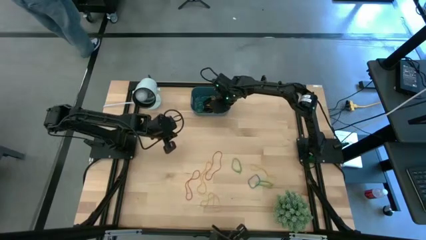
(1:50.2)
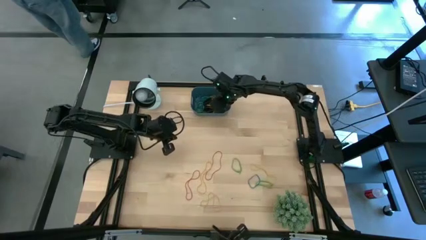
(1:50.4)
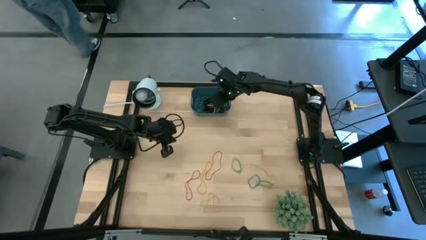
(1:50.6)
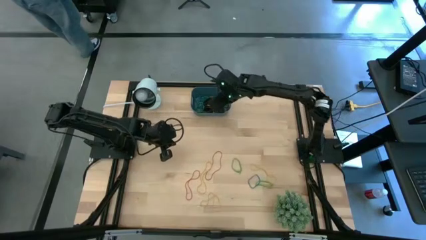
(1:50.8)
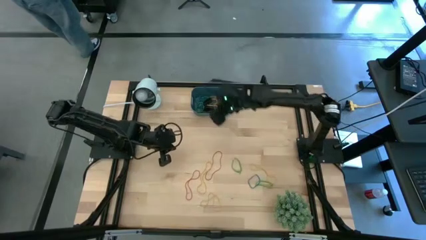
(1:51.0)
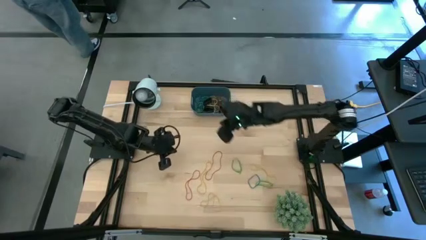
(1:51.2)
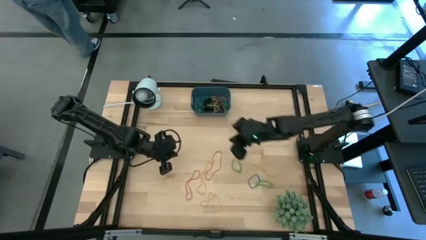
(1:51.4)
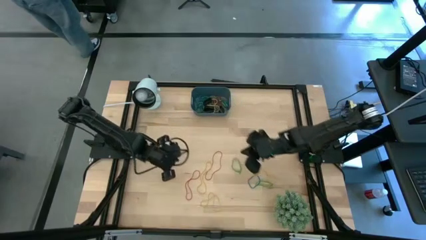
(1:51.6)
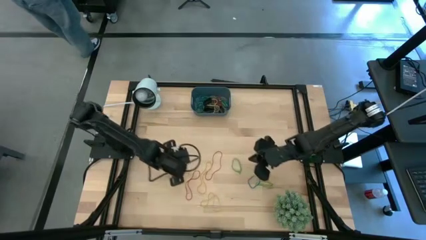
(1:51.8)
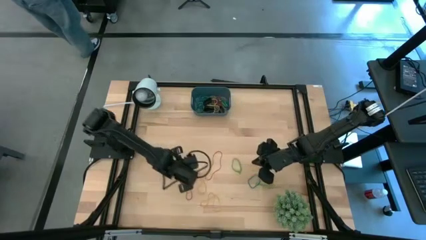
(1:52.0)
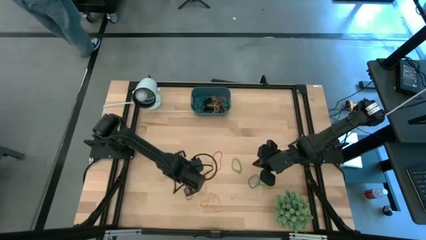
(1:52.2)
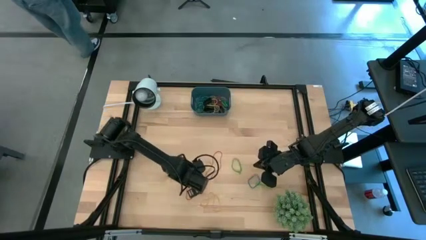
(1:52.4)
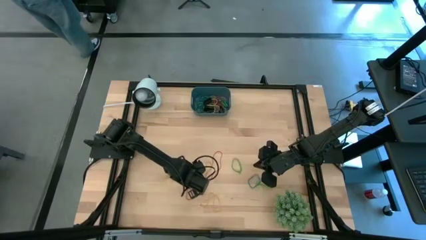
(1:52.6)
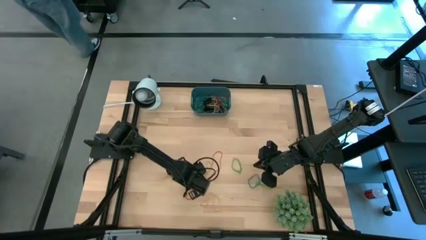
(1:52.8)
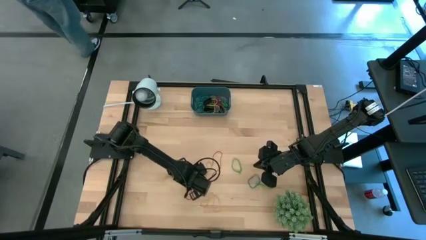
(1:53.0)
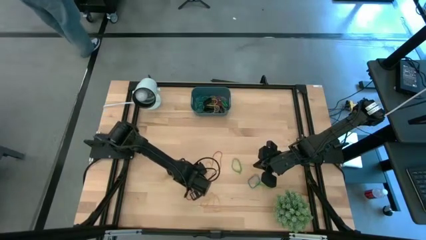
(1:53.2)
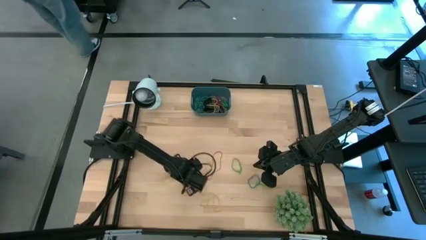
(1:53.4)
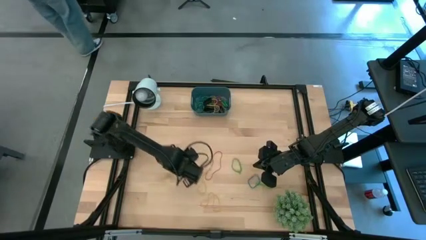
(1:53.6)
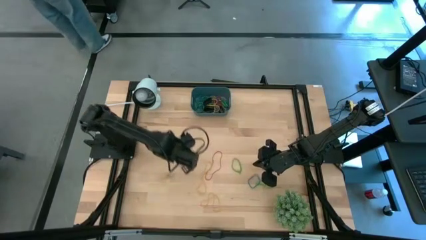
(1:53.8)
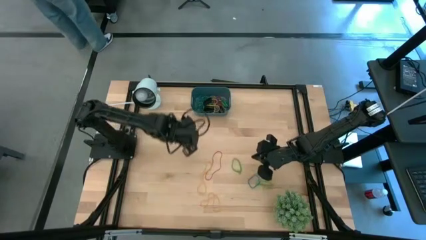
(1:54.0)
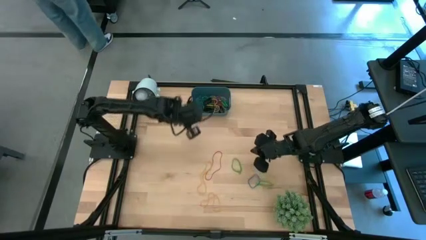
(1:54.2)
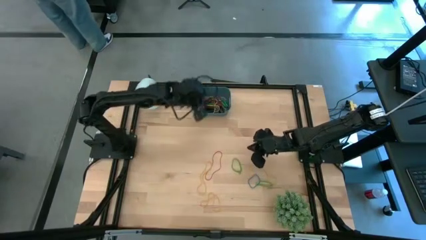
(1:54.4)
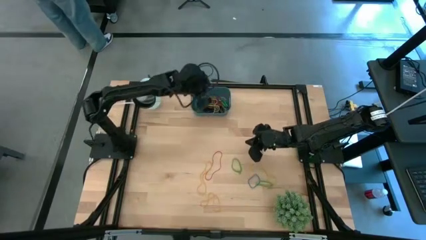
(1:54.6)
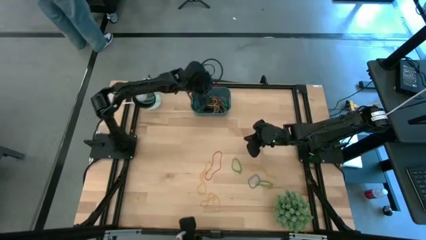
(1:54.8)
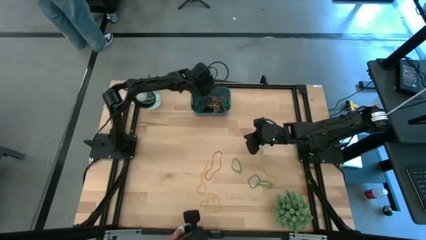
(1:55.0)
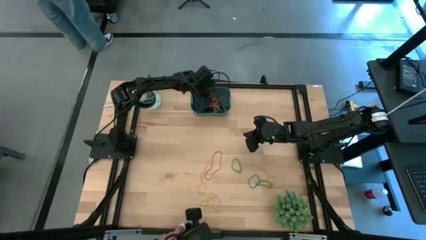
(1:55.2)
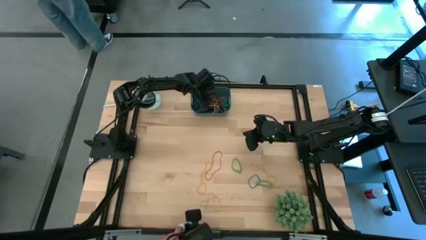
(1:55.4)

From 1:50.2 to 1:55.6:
Task: Pick and place rubber bands into bin
Put the red rubber band into the blue bin

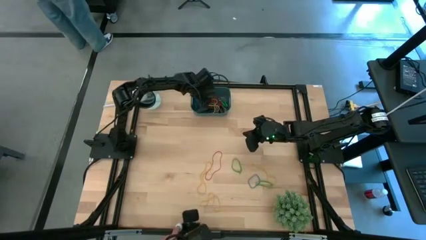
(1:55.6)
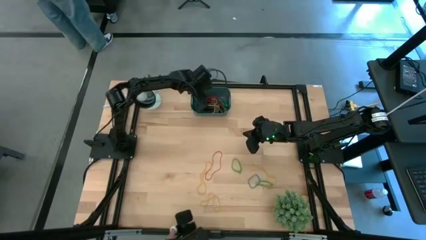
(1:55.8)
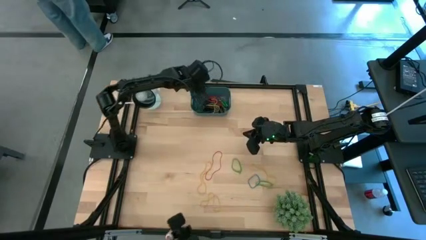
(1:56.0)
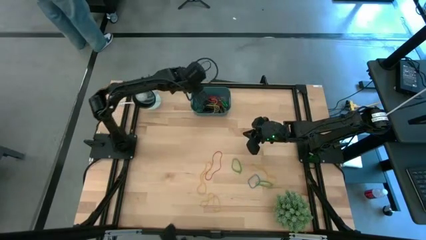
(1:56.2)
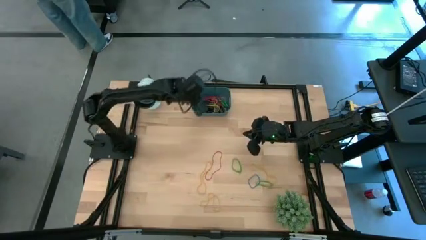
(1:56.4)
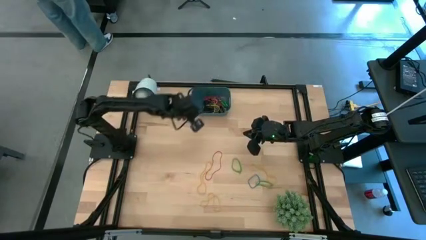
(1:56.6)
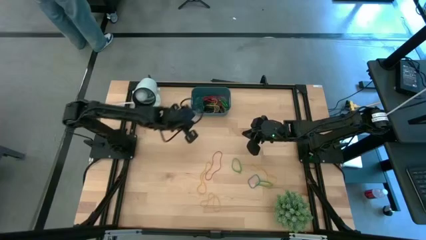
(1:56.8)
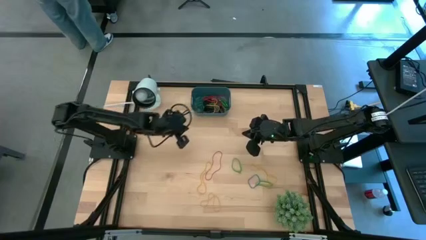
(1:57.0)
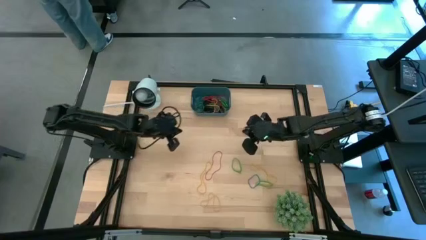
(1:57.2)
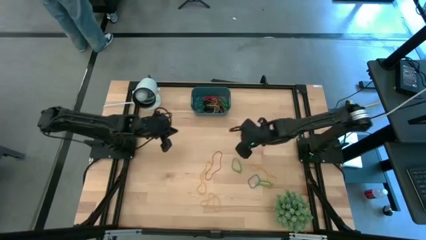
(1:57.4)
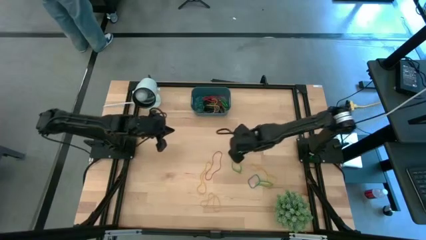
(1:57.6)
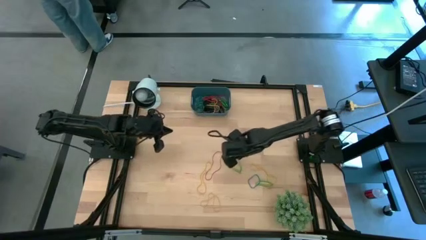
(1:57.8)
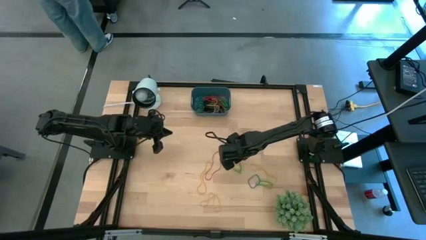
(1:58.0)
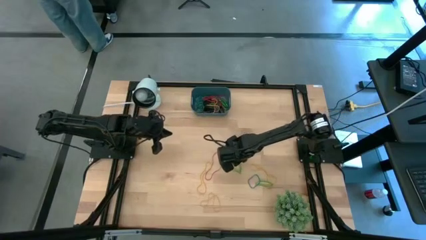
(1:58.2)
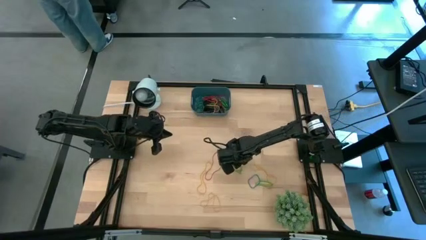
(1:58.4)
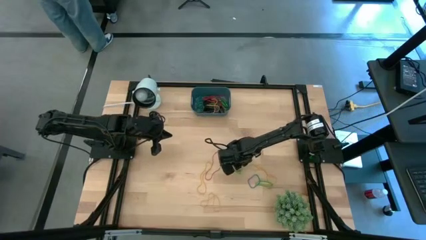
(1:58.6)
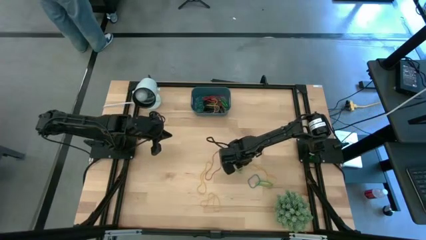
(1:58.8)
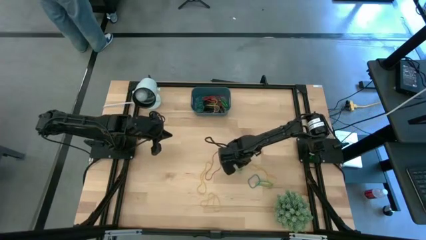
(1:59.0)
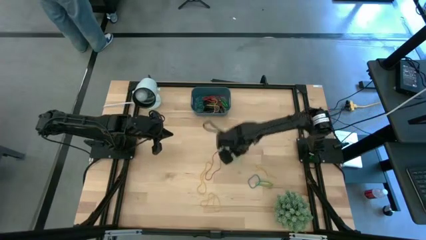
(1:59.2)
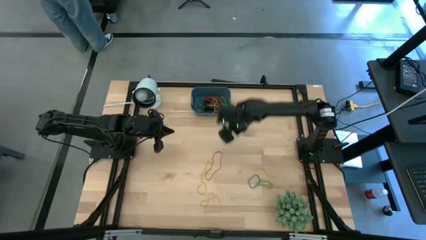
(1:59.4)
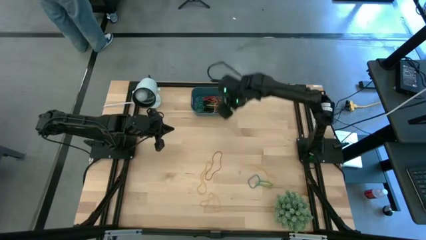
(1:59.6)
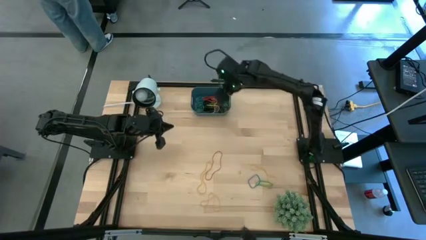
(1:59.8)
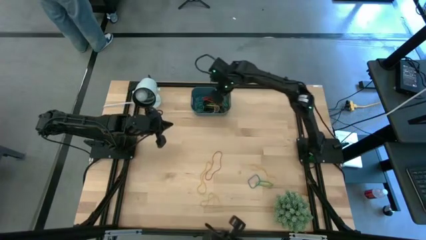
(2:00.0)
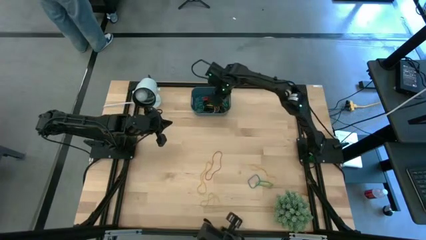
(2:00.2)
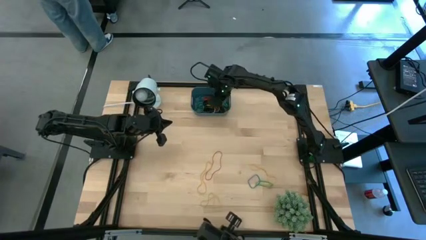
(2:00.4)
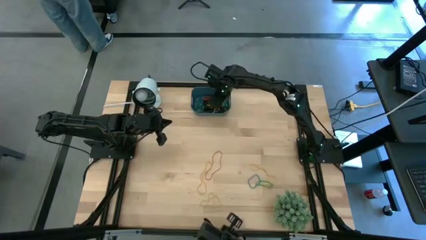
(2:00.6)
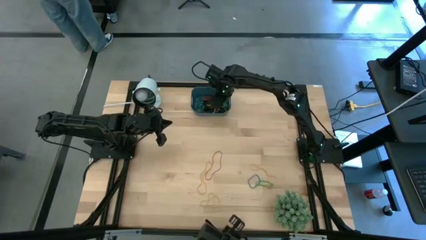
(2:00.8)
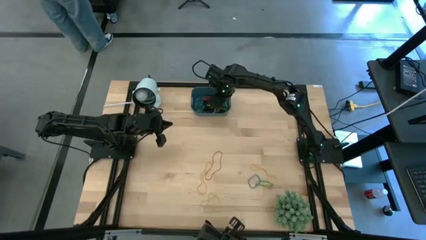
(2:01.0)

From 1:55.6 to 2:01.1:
Put the green rubber band into the blue bin

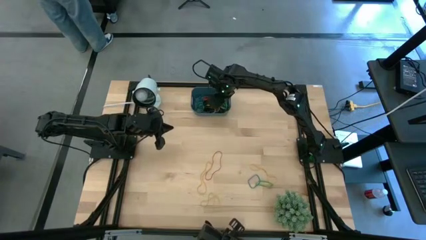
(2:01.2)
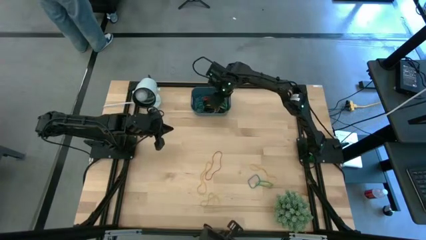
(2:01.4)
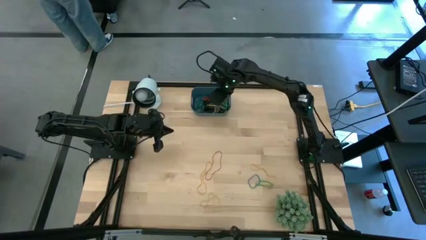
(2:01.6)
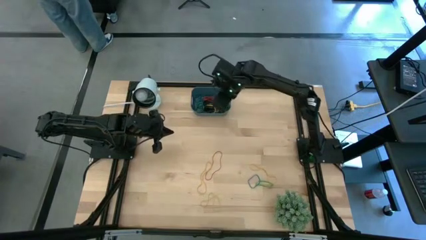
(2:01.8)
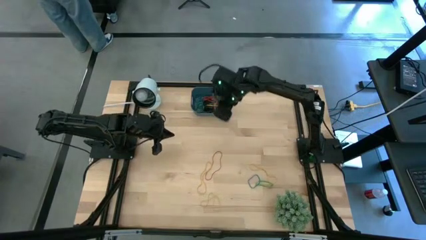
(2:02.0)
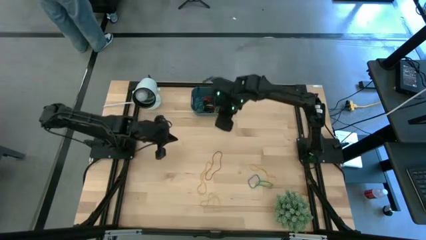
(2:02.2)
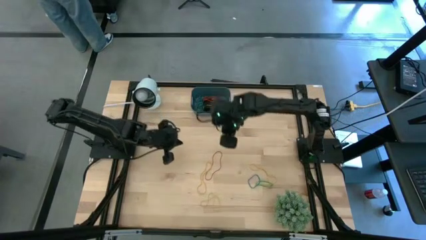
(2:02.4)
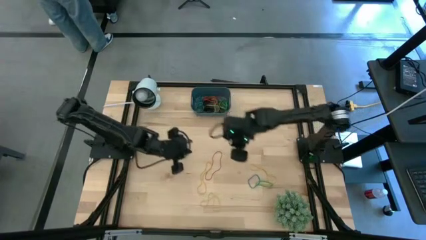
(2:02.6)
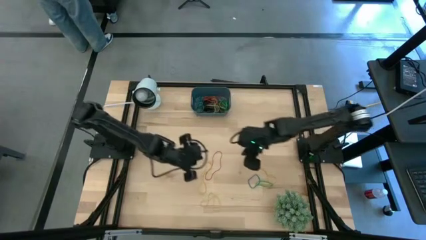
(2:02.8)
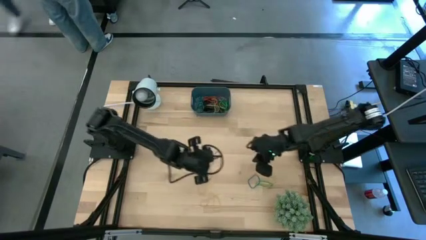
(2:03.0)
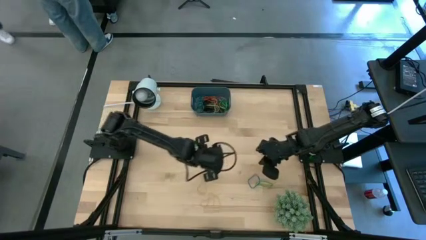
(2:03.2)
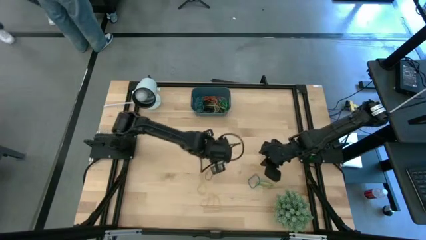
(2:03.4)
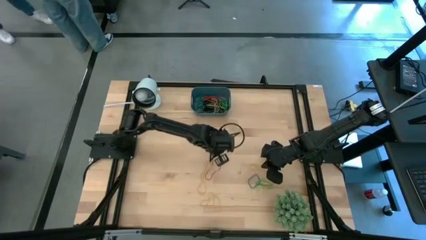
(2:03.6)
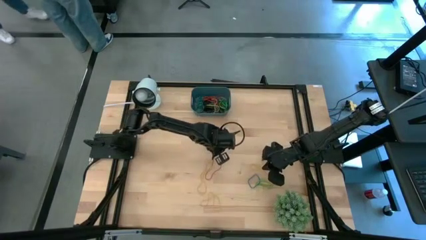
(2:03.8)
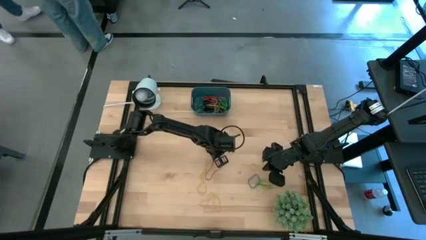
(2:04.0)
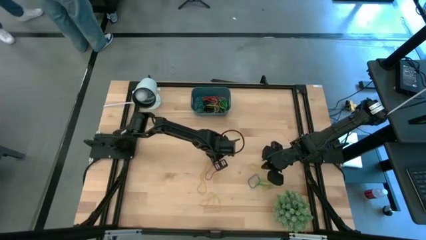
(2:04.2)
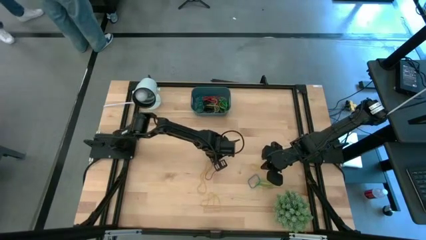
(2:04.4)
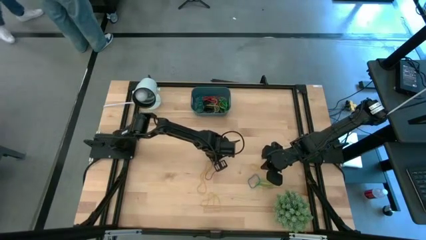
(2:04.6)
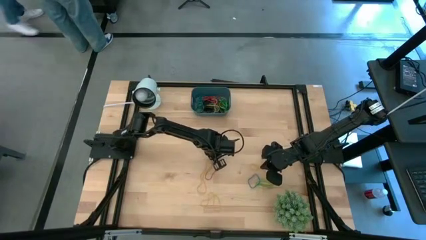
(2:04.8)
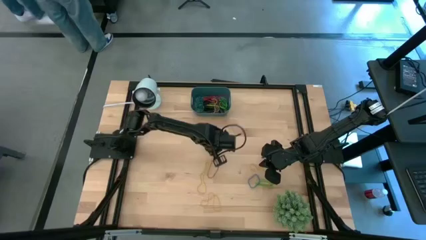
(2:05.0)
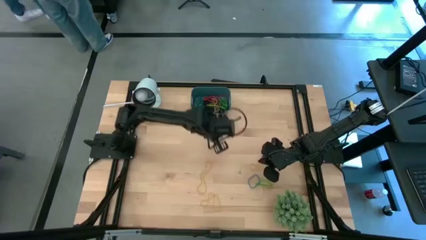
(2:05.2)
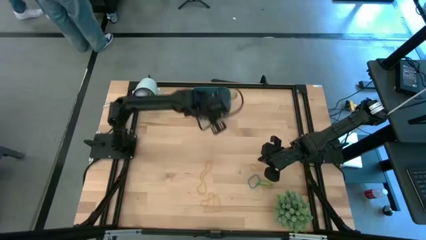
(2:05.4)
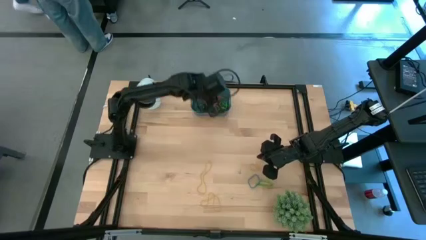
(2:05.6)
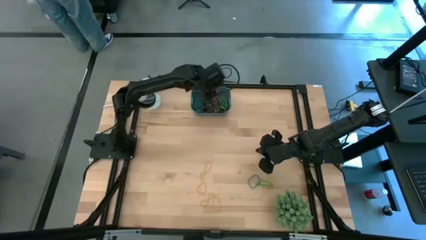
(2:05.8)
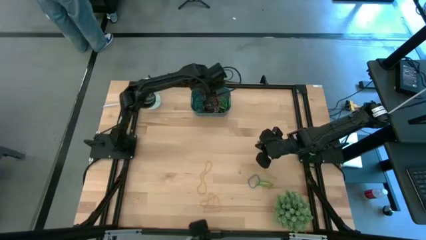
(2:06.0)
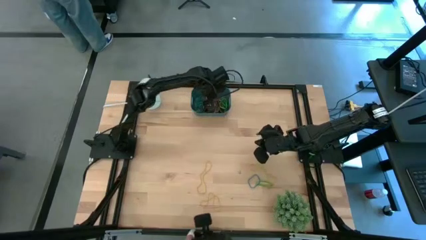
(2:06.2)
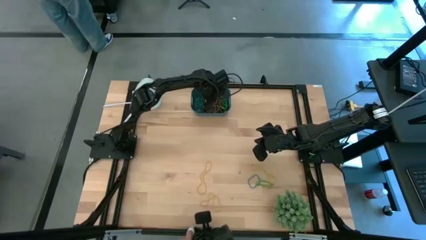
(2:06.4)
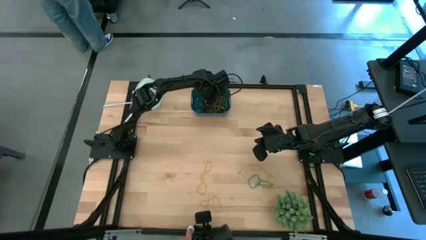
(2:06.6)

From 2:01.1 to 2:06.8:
Put the red rubber band into the blue bin
